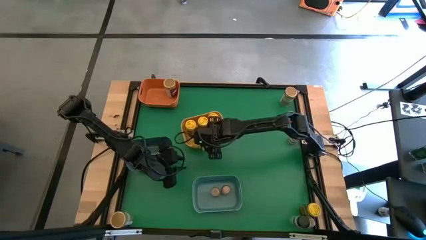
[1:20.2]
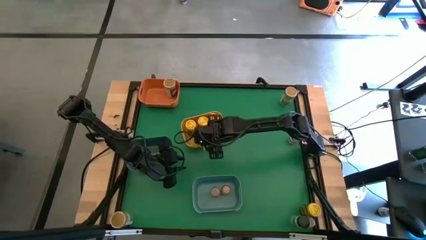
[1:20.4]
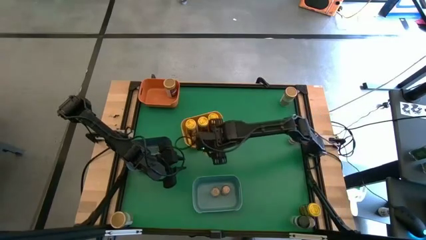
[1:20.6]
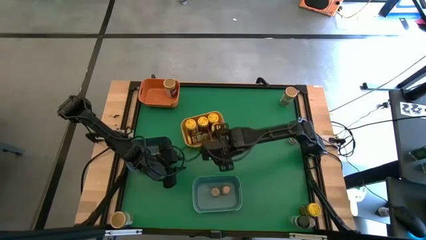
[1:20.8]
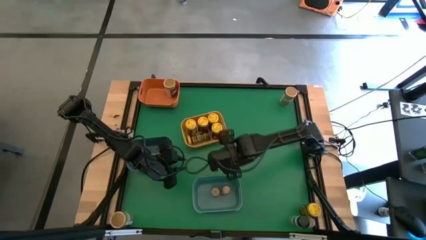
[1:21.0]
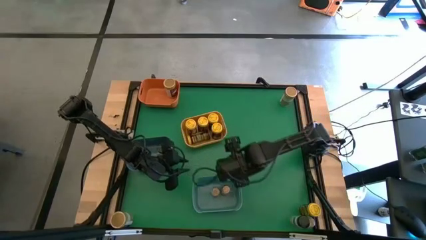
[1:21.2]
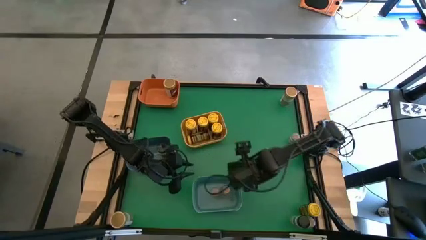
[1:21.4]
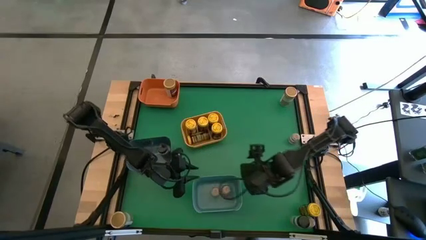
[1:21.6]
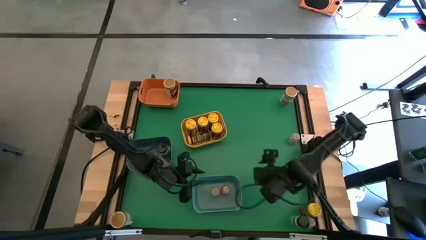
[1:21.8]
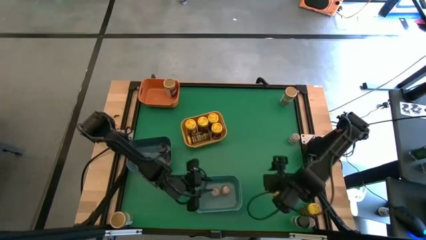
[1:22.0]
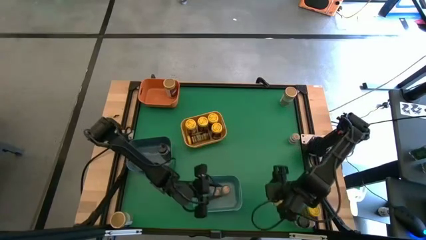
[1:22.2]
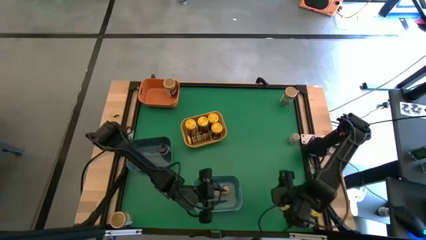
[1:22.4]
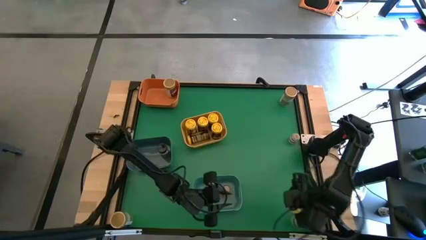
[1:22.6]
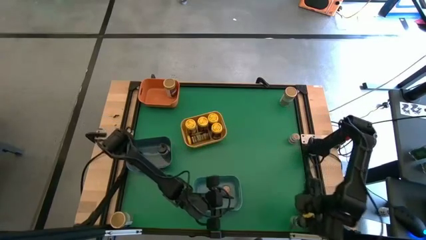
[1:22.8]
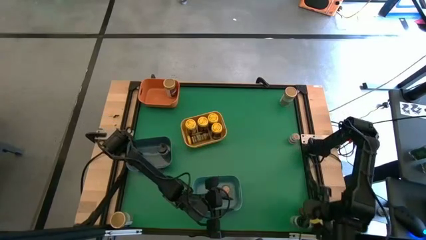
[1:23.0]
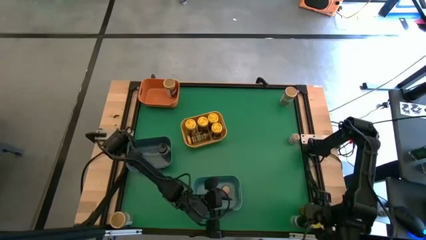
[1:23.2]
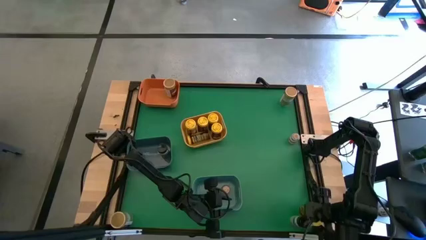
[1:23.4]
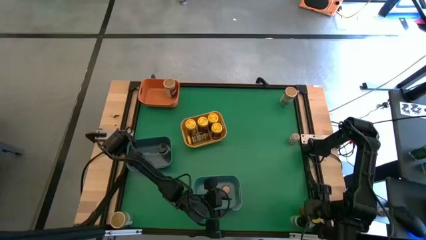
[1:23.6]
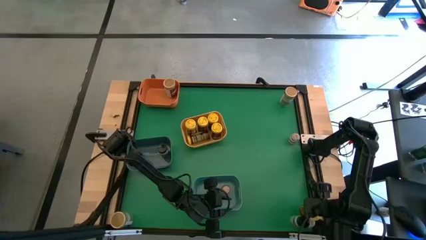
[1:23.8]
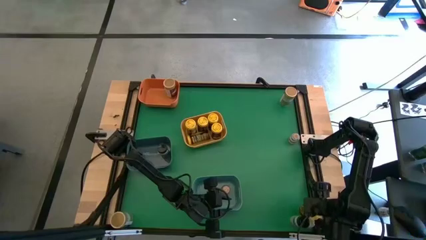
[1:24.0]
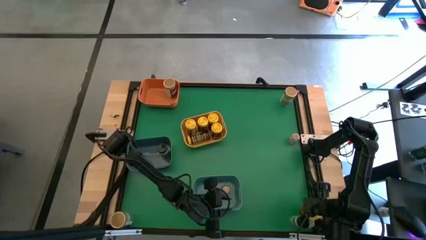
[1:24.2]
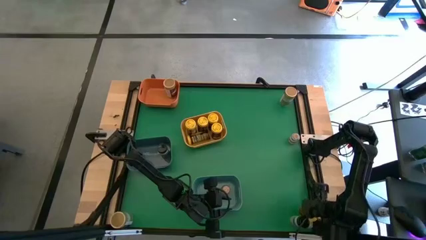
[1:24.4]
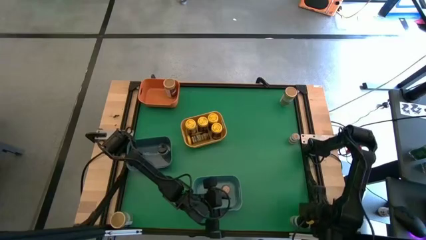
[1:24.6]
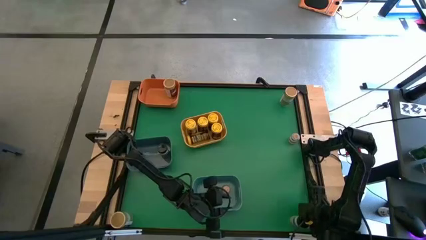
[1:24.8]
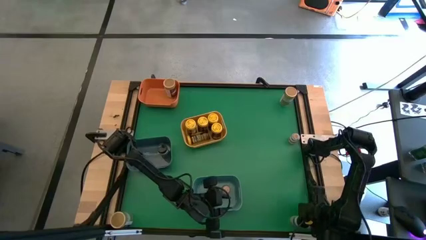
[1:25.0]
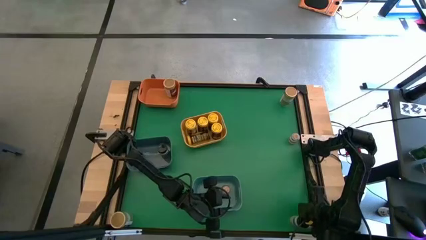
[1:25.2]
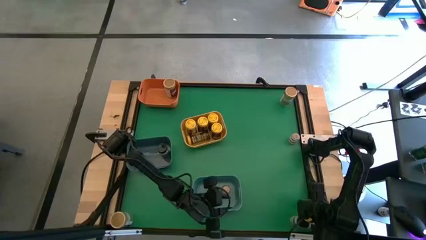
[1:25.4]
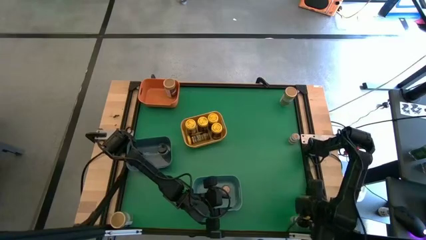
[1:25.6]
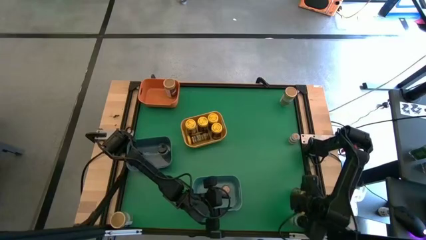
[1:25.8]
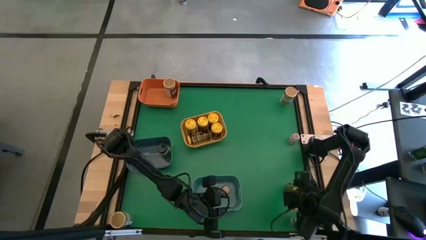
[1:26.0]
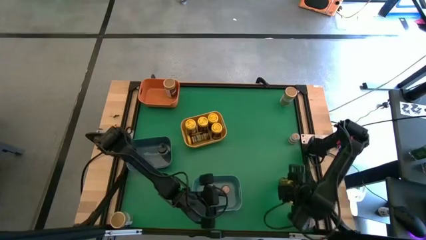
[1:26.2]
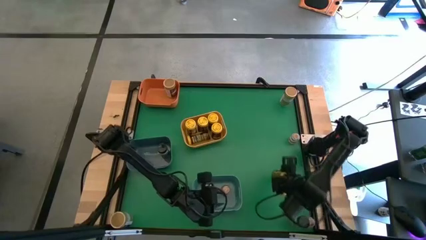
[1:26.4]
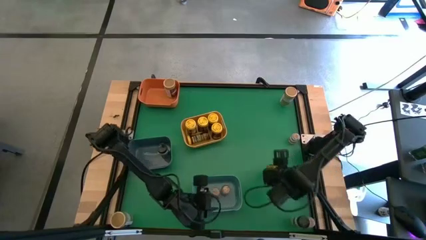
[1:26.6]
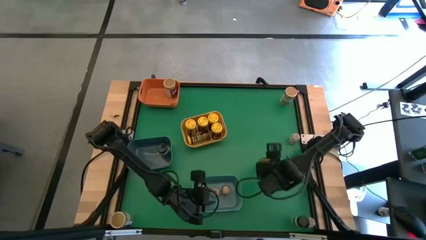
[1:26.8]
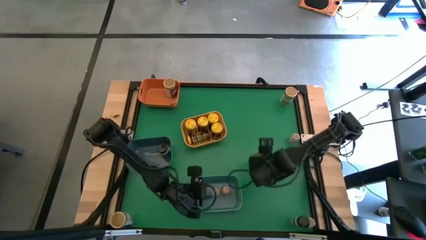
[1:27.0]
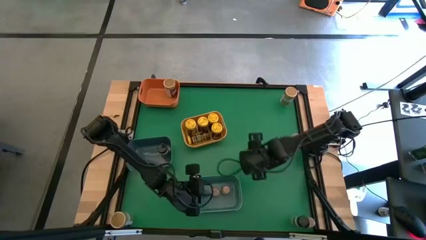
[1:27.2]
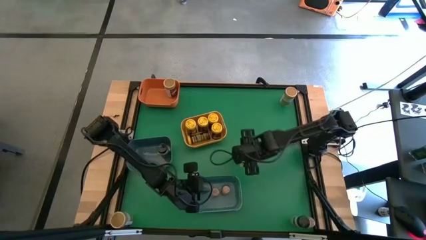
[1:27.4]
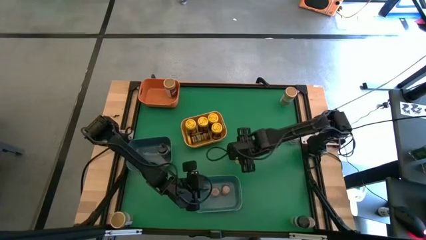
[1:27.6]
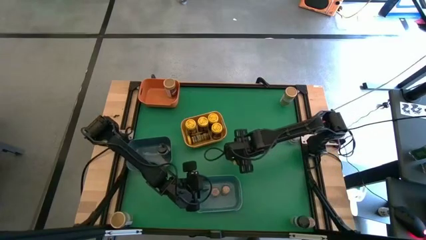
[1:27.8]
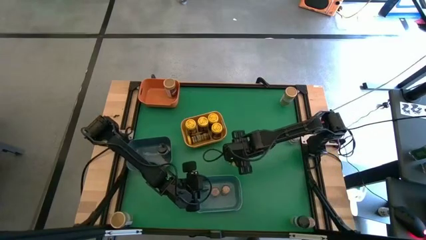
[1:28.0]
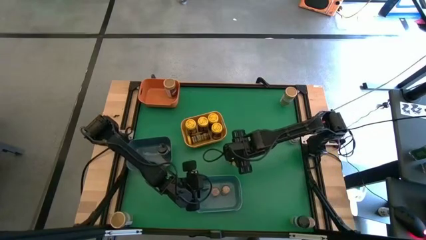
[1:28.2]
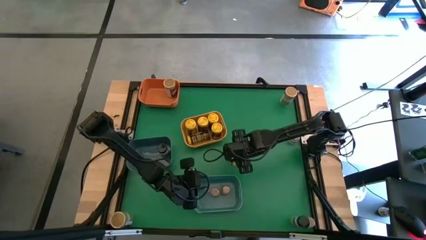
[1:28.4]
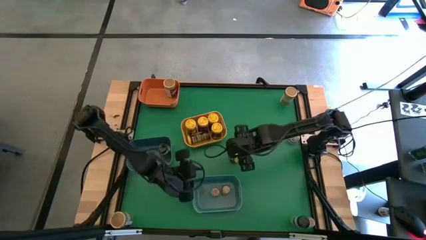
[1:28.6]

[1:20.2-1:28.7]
Task: Sort spices by type
Move the yellow seasoning to the center of the table

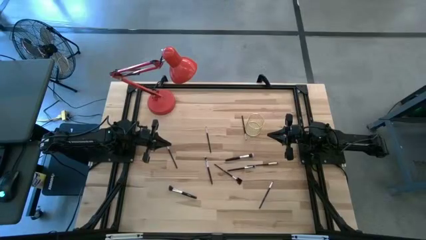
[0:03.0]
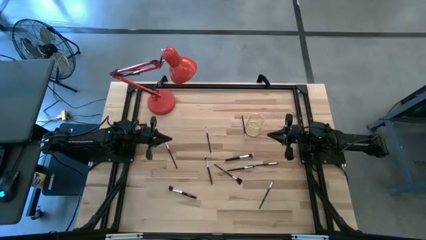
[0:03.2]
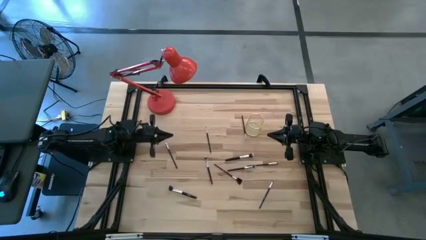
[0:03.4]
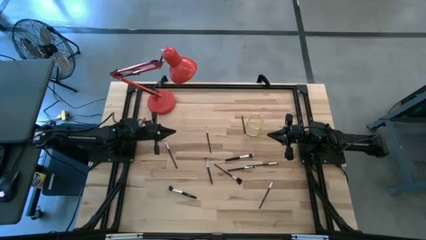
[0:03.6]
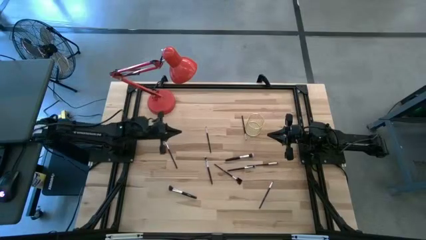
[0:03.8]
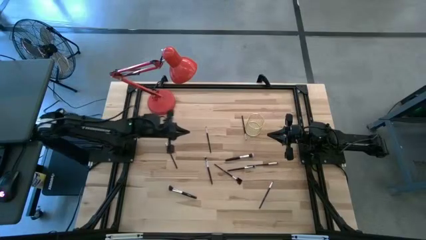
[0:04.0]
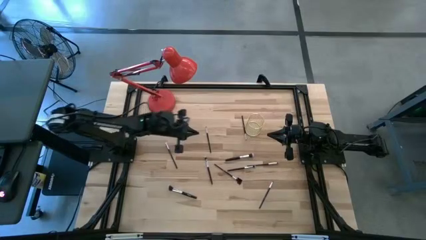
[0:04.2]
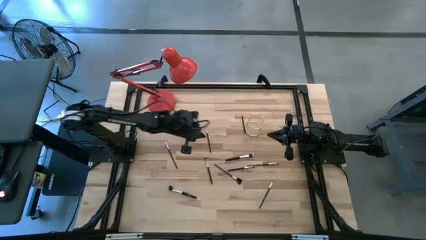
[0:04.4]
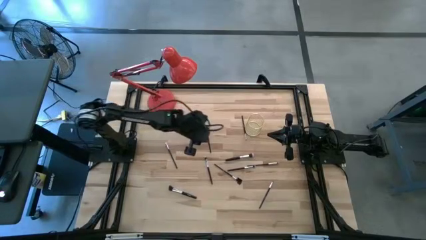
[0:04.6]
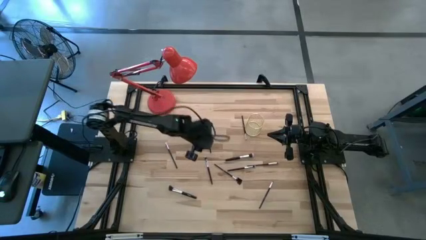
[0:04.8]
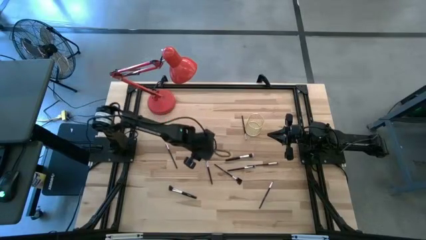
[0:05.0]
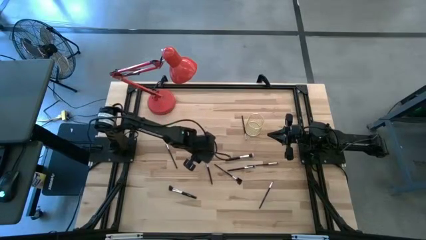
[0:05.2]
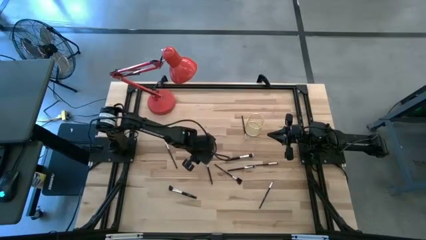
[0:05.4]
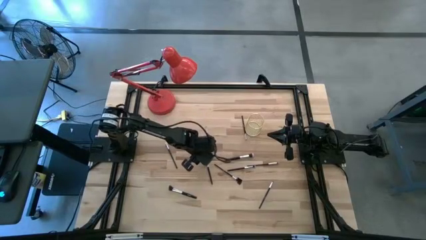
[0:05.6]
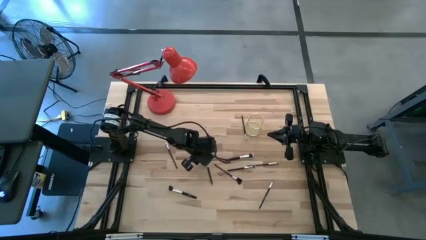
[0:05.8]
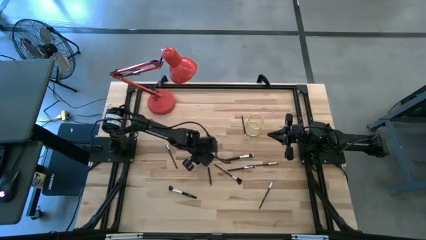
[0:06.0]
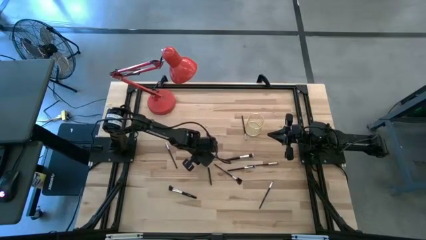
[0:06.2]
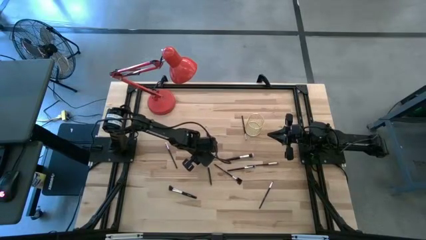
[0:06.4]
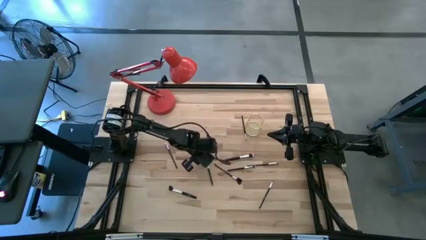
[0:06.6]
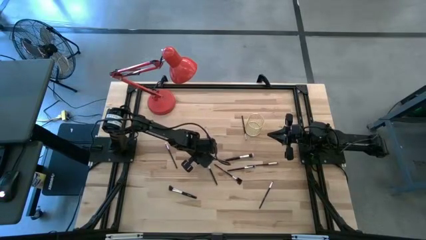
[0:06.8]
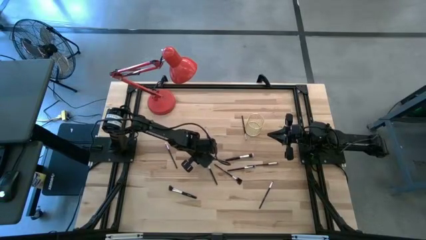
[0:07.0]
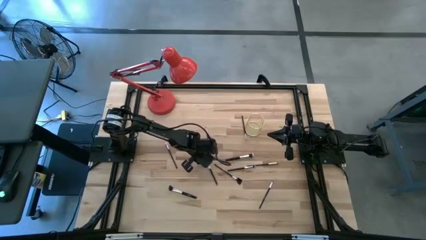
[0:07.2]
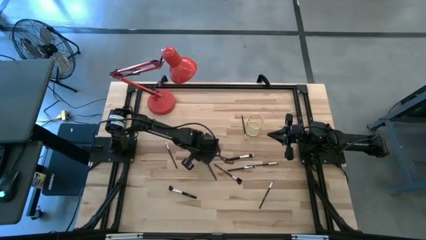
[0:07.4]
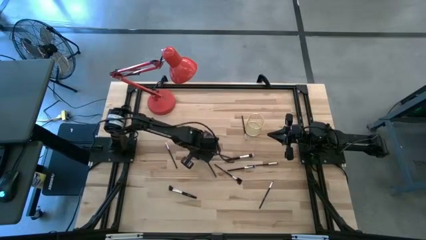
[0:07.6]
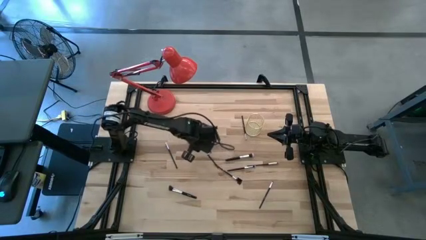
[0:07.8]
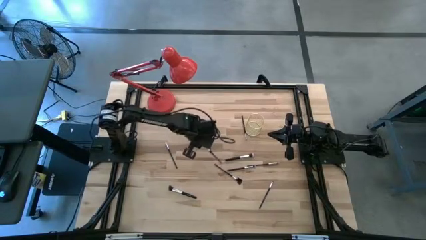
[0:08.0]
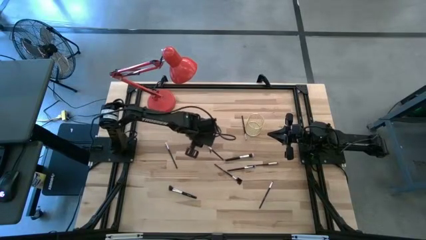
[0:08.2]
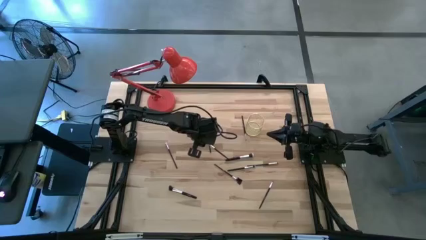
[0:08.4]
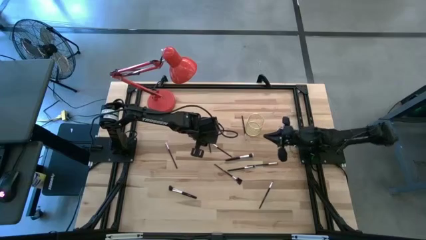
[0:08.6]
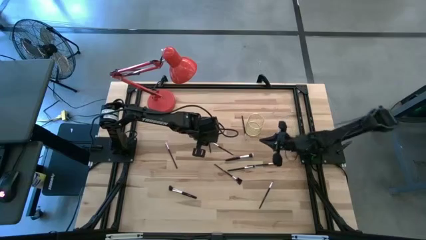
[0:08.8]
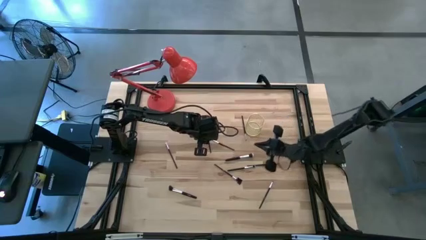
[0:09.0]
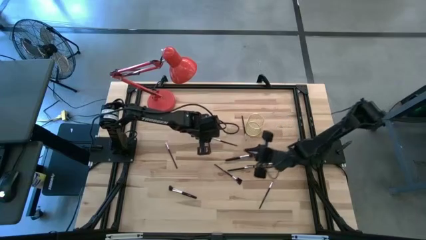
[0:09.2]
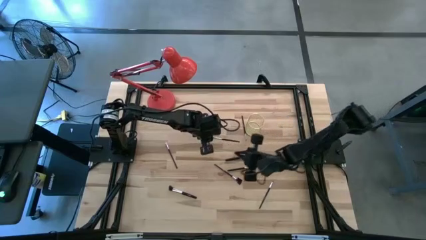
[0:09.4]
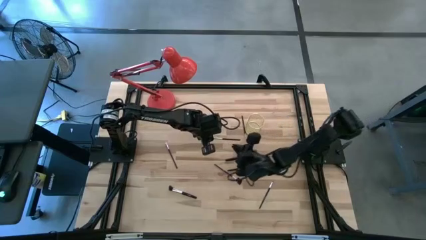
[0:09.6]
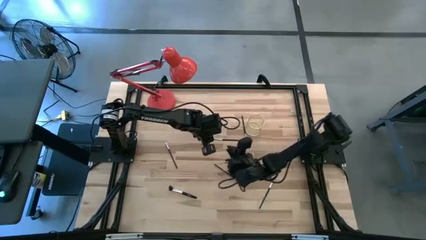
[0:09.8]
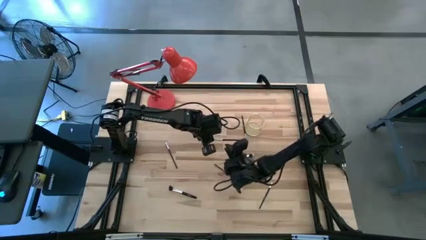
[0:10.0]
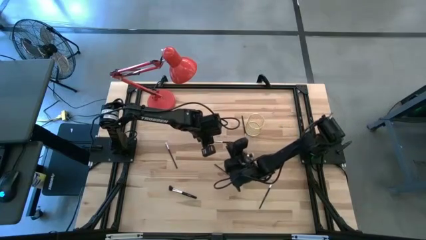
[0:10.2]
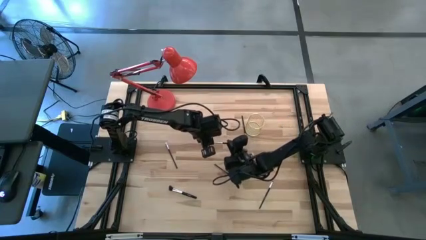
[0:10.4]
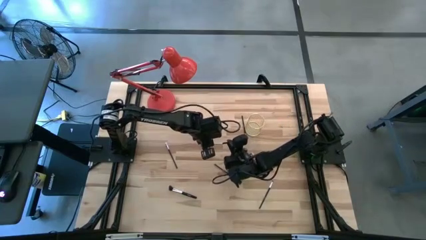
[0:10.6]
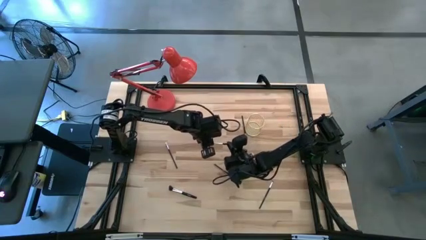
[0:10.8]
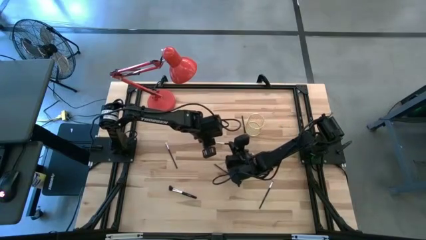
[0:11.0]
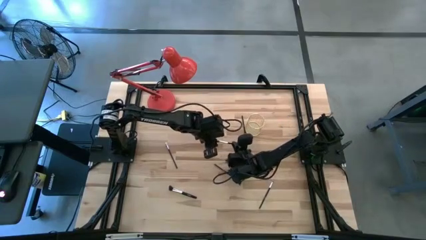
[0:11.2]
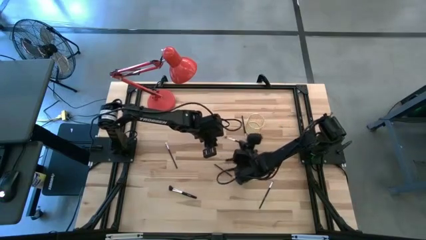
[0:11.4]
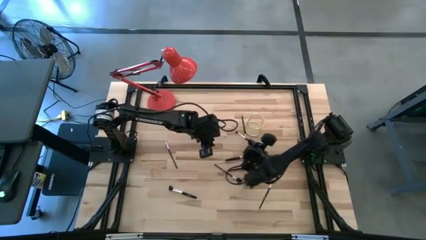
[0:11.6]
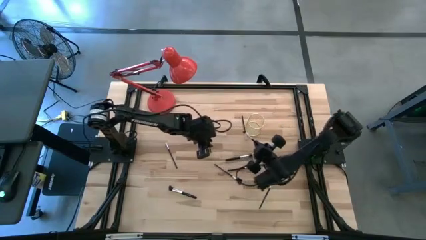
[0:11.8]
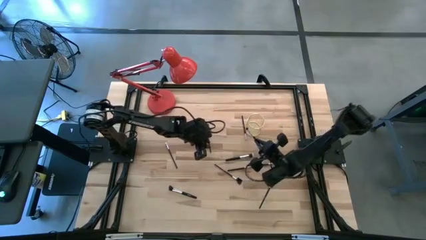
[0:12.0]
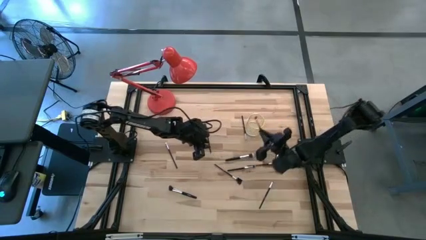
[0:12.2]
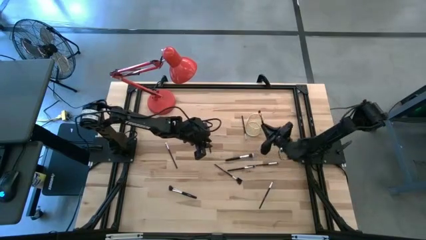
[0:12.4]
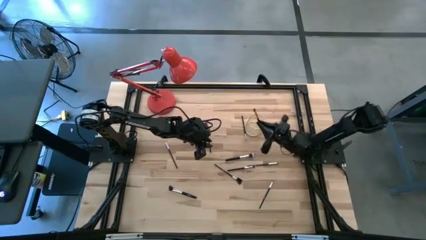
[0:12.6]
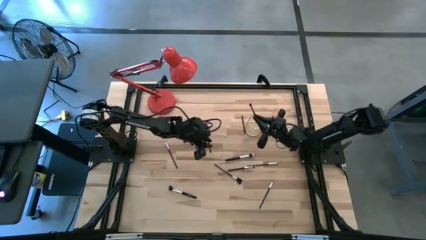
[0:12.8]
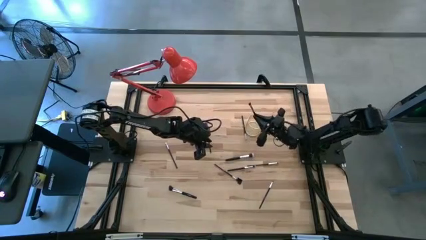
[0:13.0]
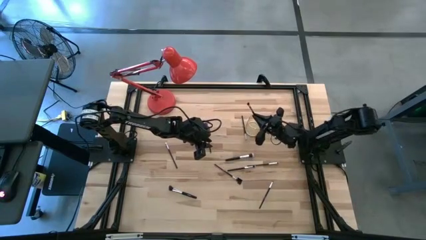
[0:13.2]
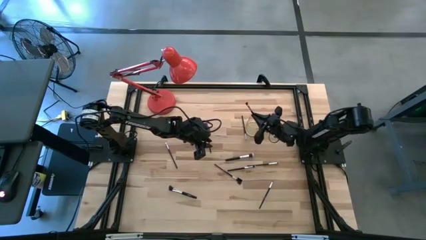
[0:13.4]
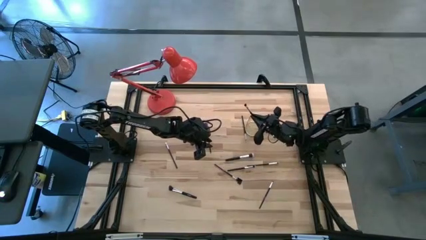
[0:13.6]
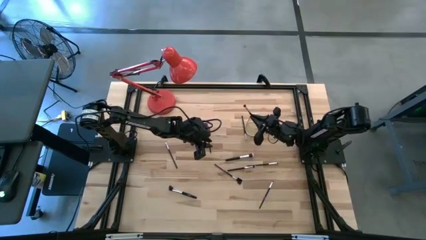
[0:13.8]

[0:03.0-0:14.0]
Task: Put items in baskets/containers
Put the black brush into the gold holder
